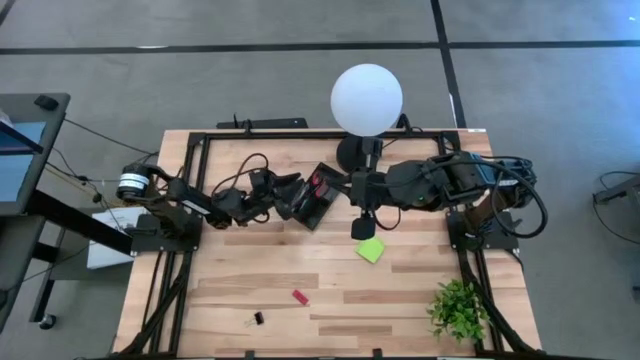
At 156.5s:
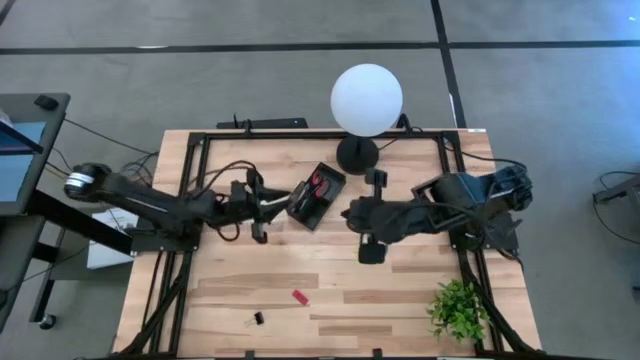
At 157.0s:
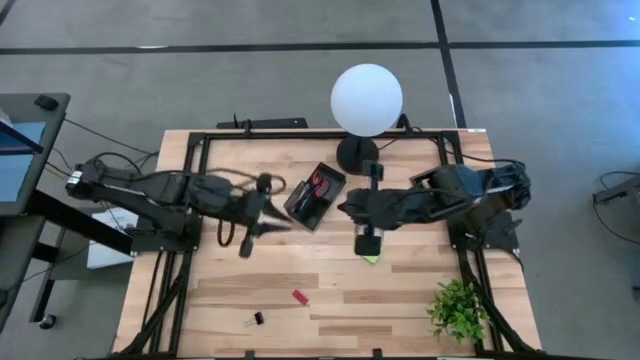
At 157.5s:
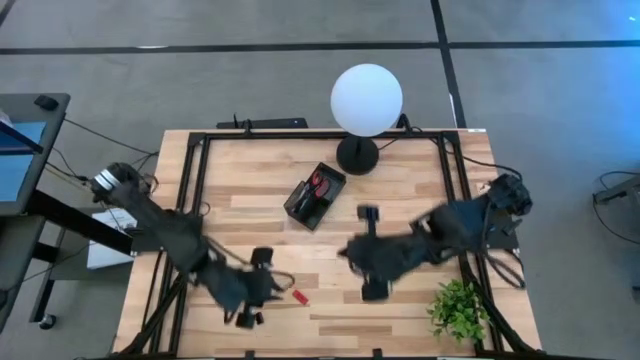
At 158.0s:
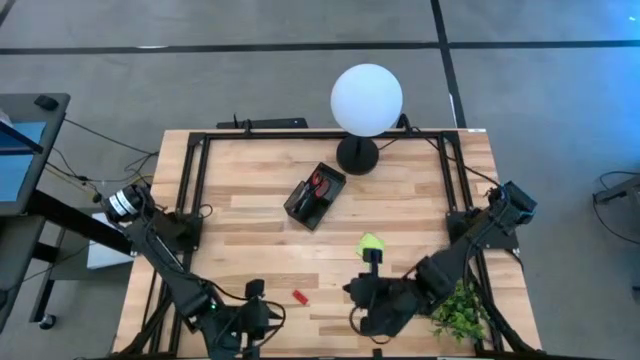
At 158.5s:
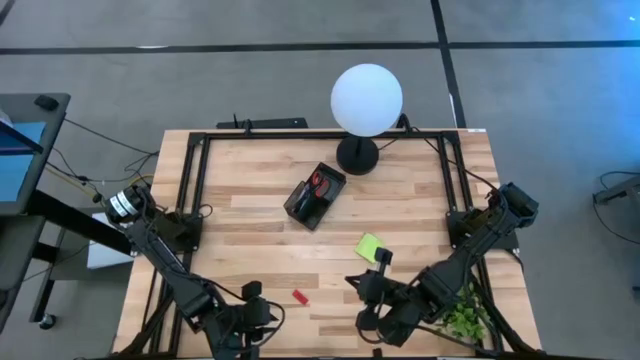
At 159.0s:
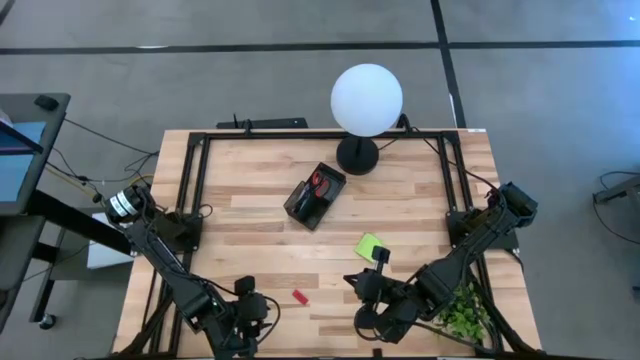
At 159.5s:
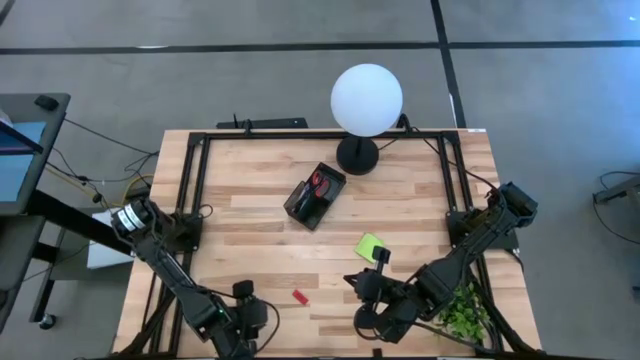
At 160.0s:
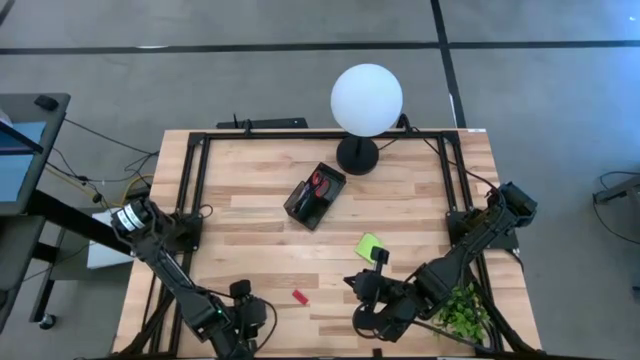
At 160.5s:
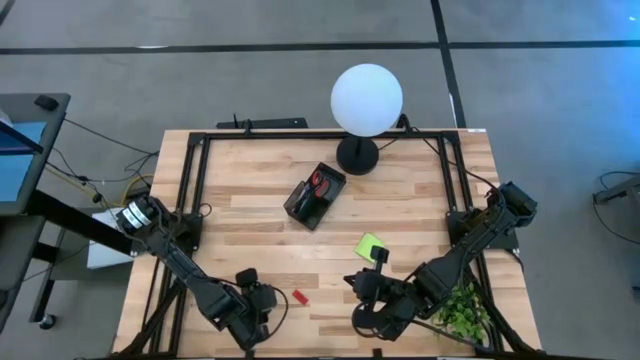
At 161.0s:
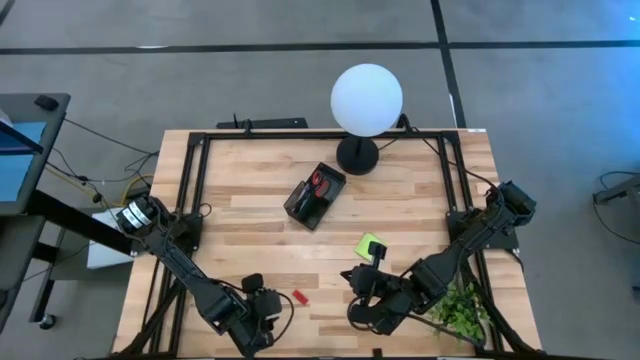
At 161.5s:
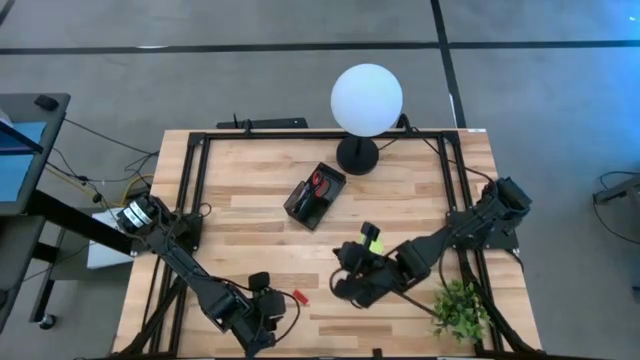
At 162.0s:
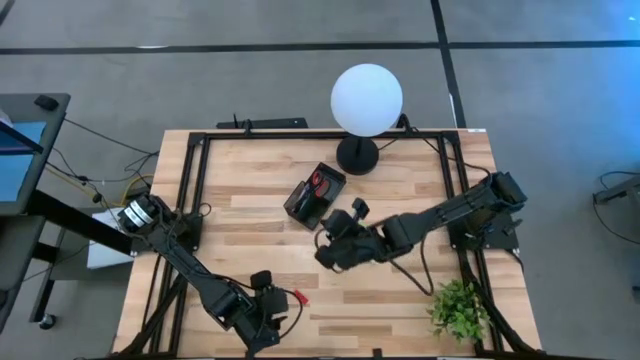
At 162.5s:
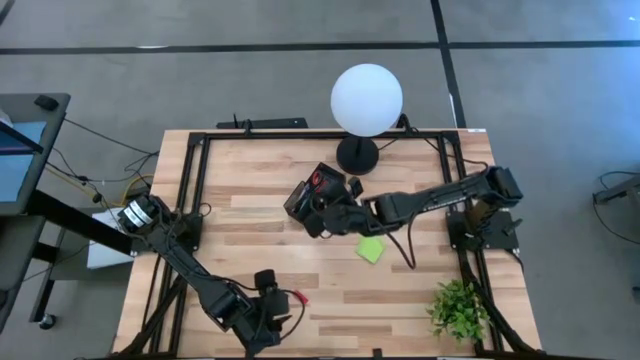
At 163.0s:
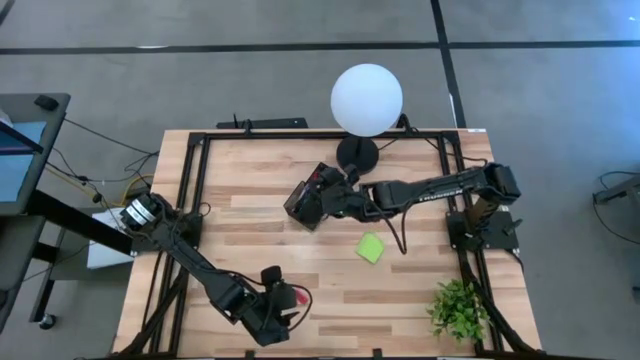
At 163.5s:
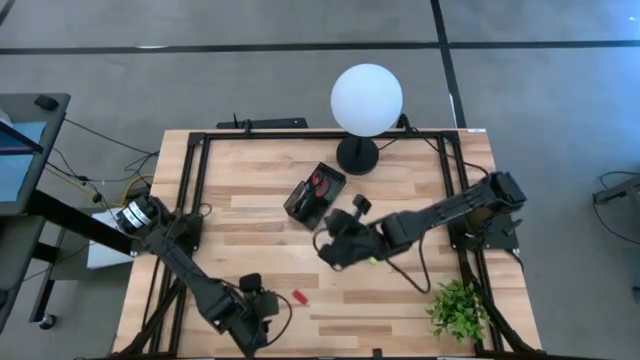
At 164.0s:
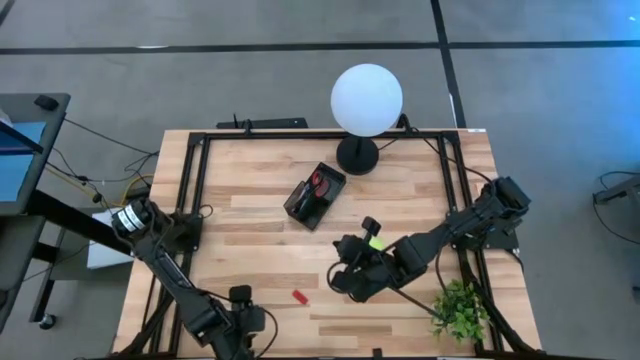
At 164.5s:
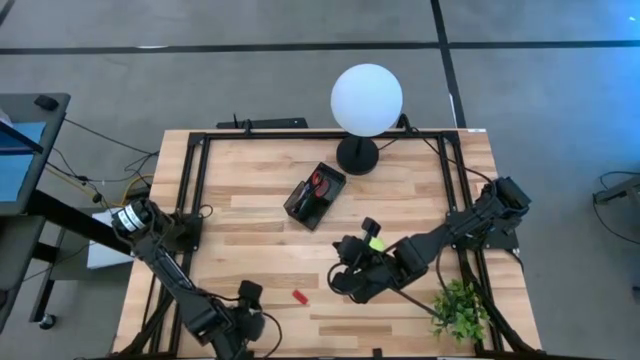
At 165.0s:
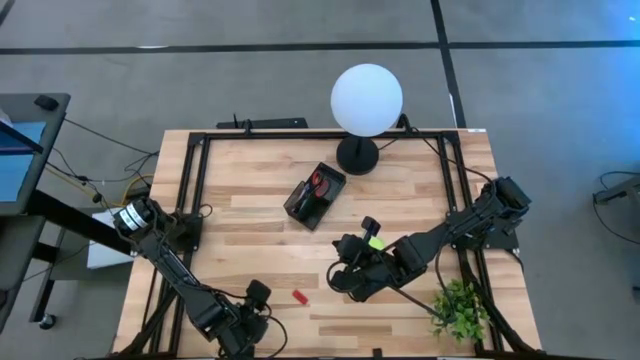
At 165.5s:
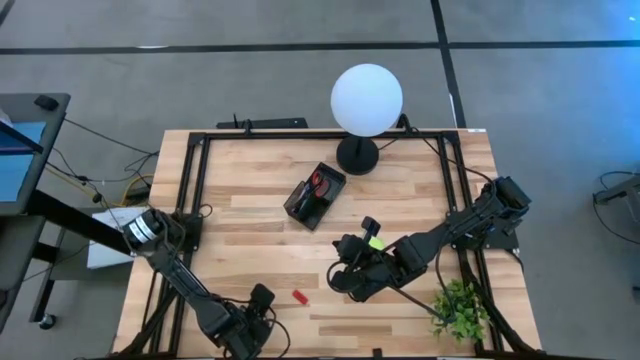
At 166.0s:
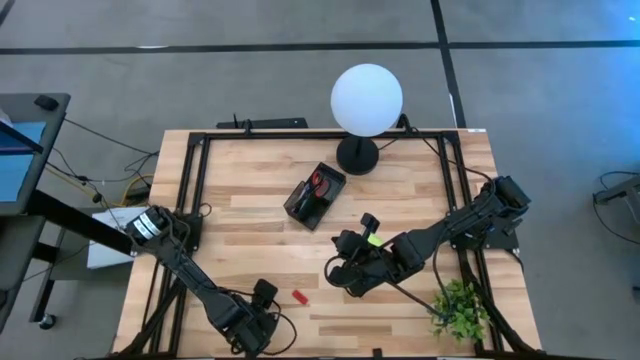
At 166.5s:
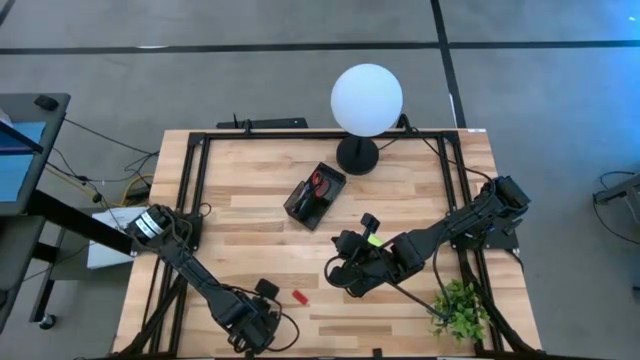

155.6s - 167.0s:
Task: Pick and place office supplies into organizer
Put the bottom black binder clip into the black desk organizer

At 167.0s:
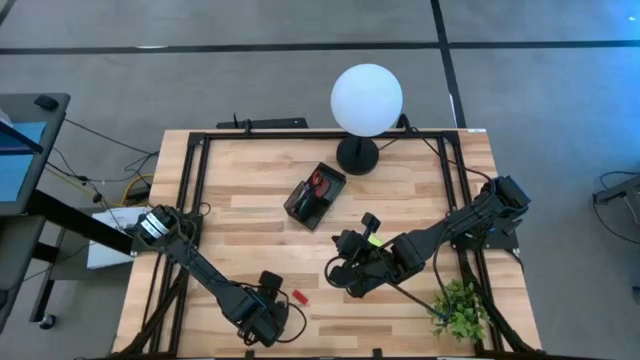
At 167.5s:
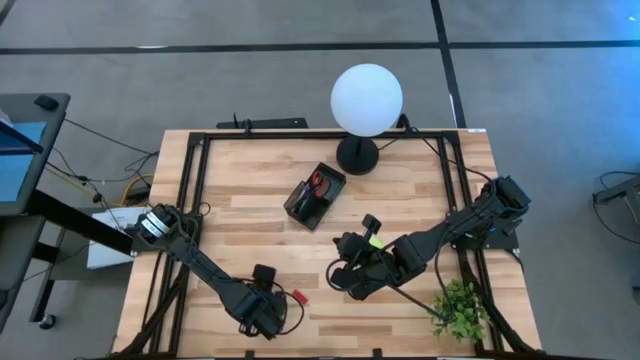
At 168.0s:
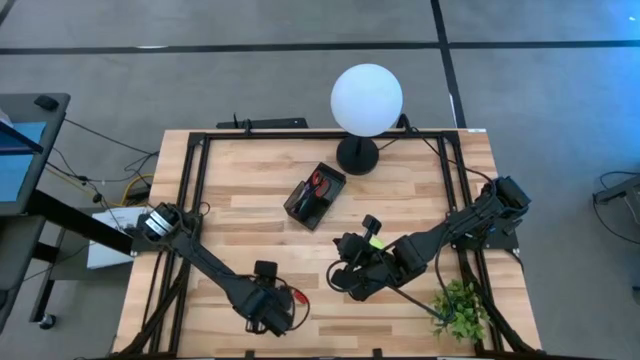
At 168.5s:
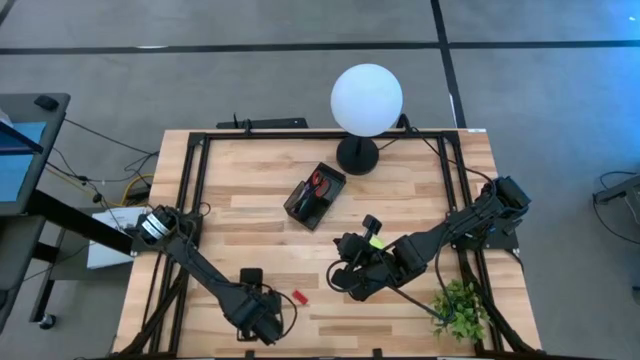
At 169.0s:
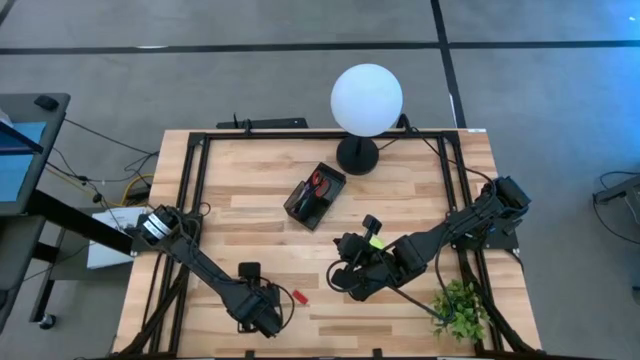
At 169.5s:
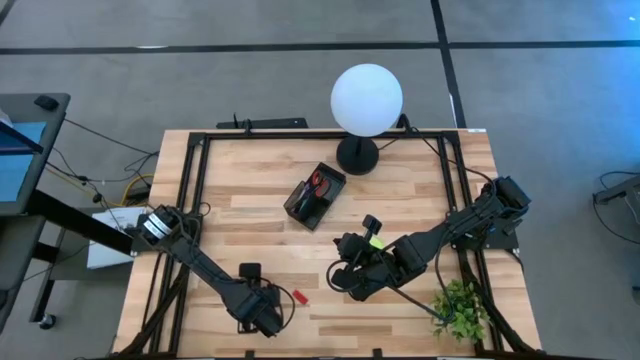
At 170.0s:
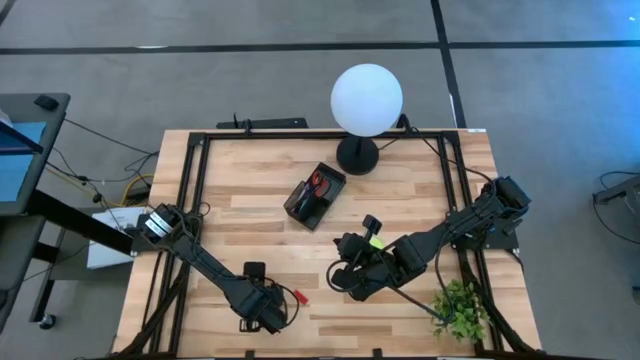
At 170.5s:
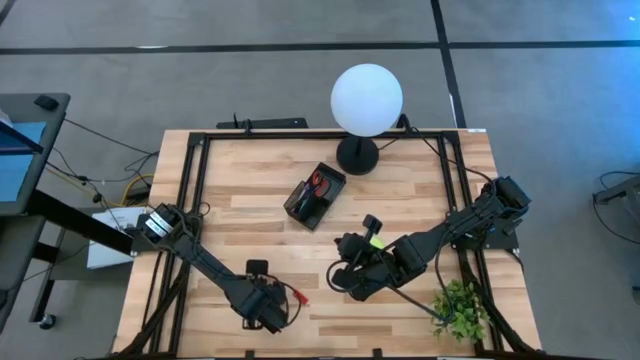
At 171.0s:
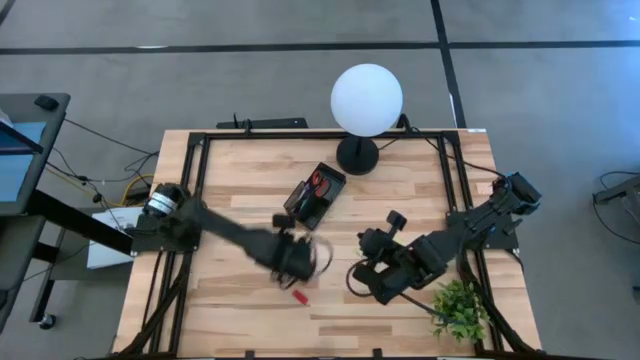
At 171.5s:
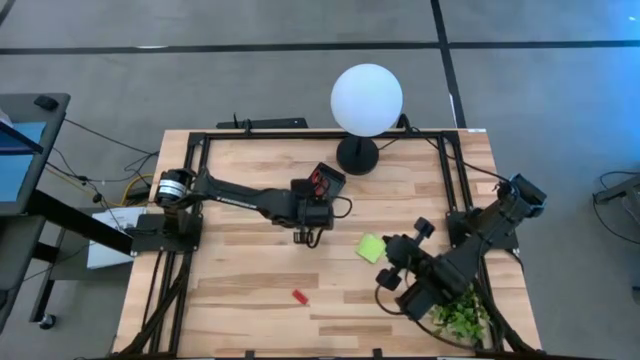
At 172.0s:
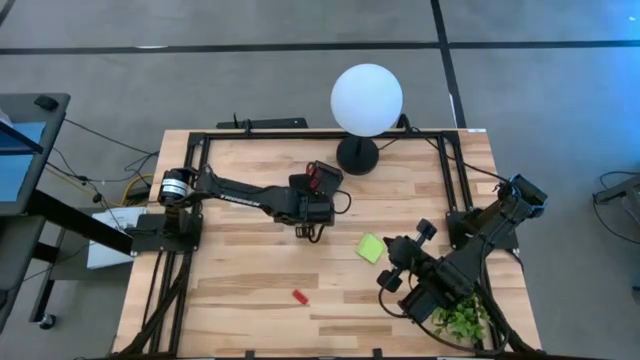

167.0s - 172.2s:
Put the bottom black binder clip into the black desk organizer

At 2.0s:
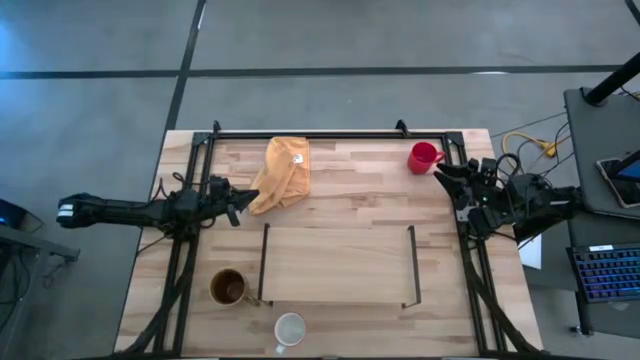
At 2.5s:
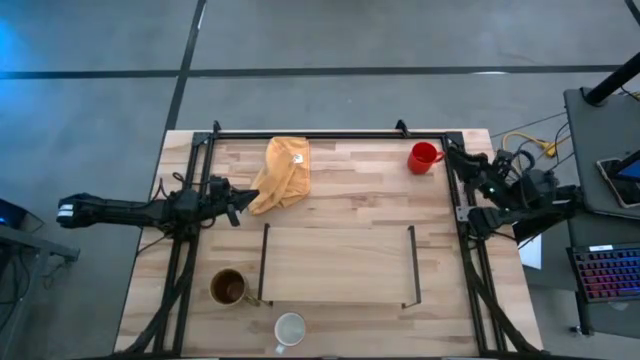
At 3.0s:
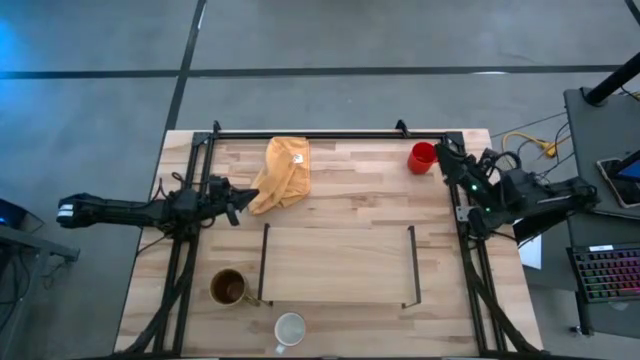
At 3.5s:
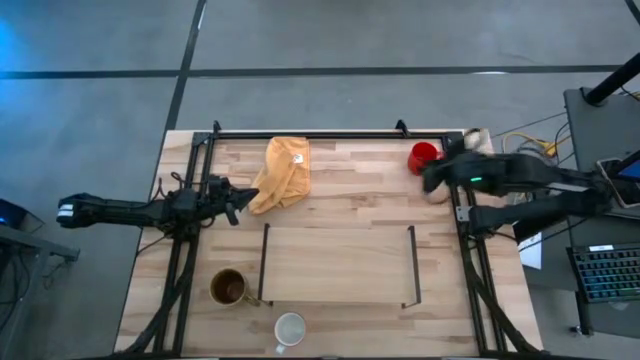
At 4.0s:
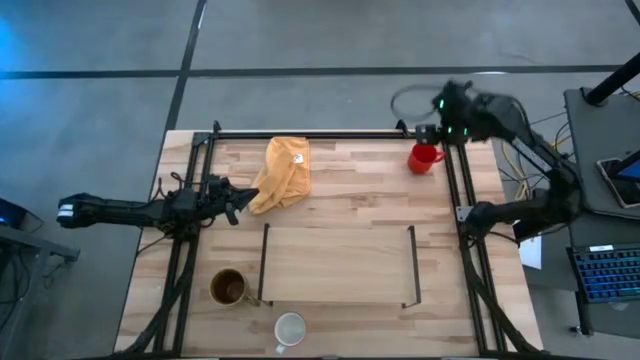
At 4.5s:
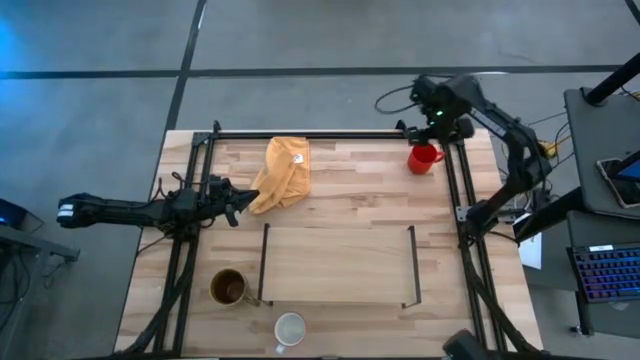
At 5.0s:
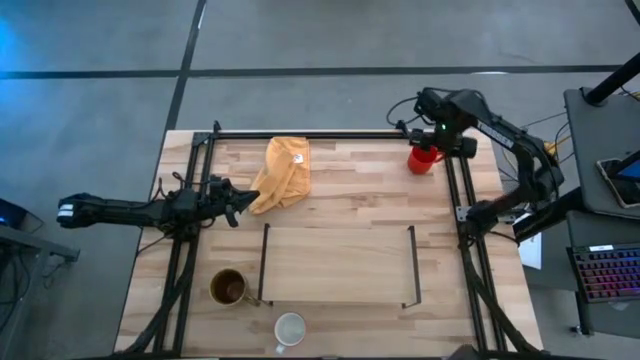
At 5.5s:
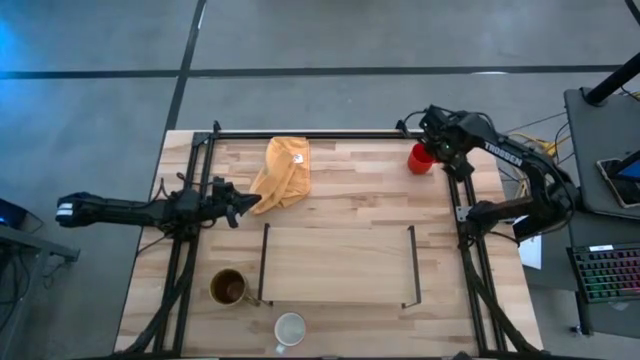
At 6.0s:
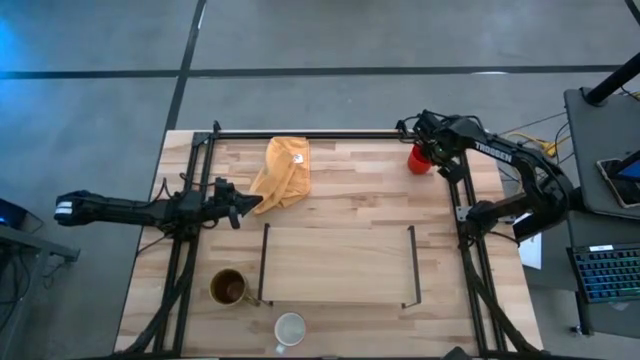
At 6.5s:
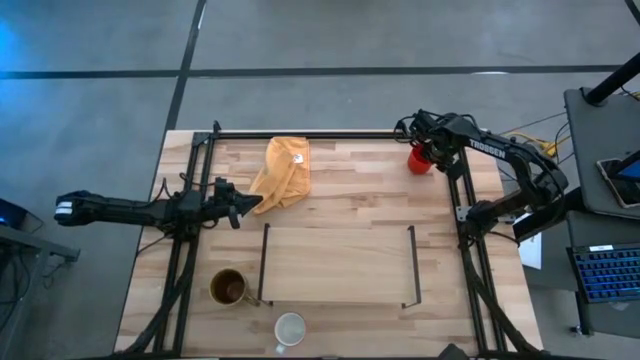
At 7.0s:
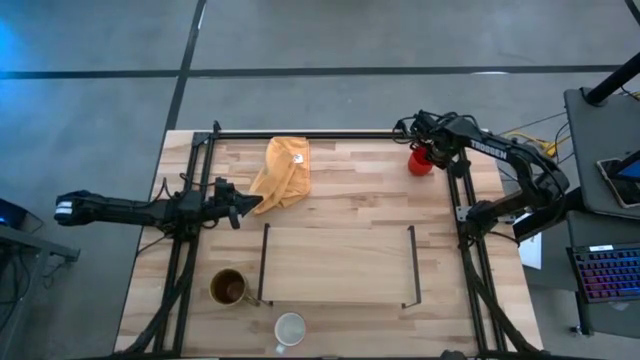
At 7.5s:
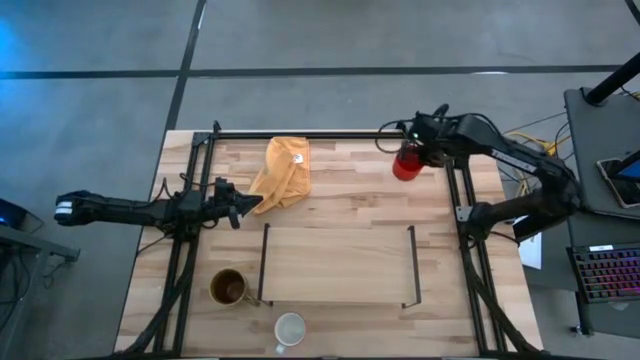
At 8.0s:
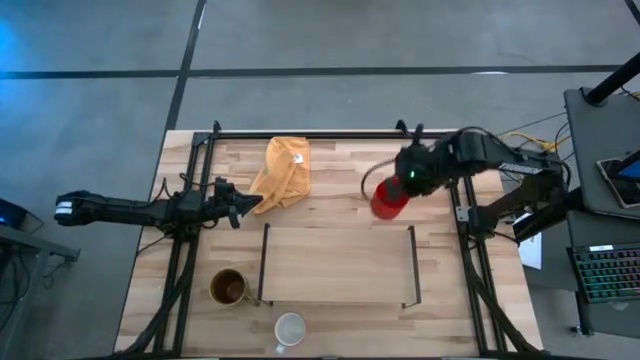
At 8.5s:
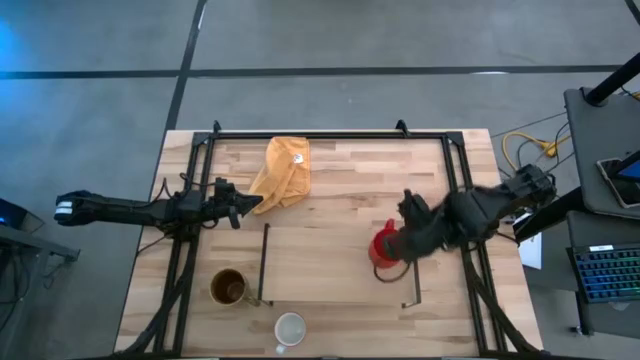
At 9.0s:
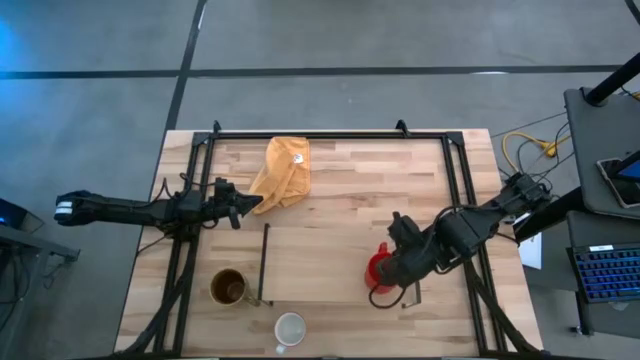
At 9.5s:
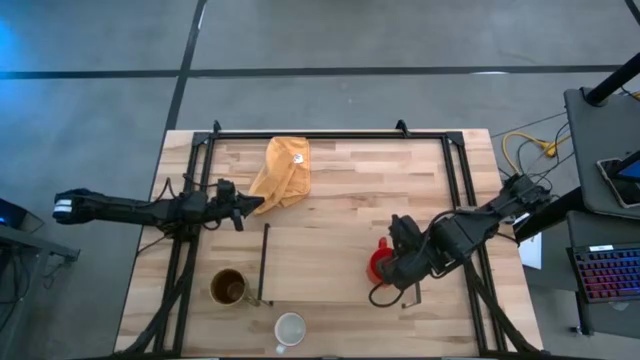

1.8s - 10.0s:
Task: Stack small to large cups/mugs on shelf
Put the red mug on the shelf
